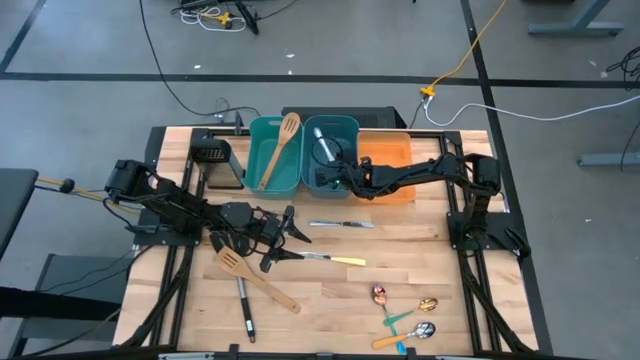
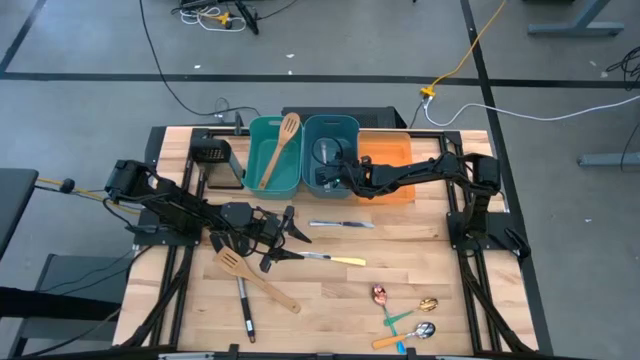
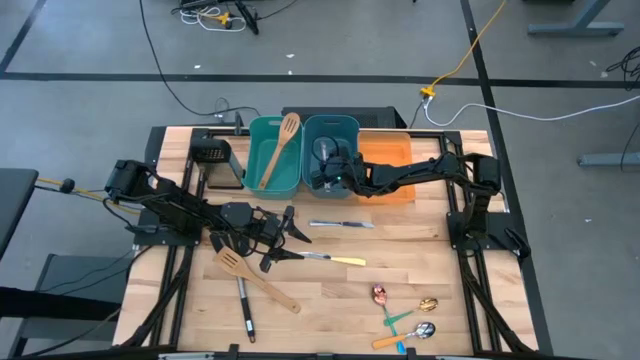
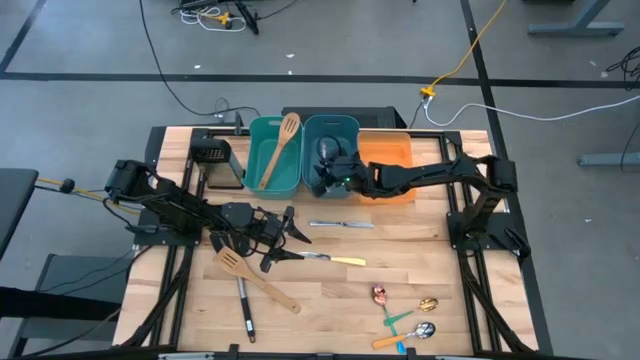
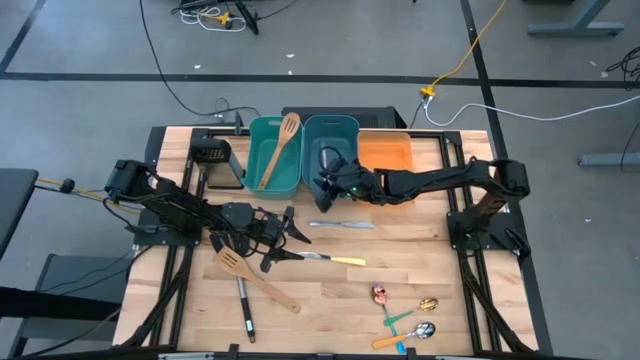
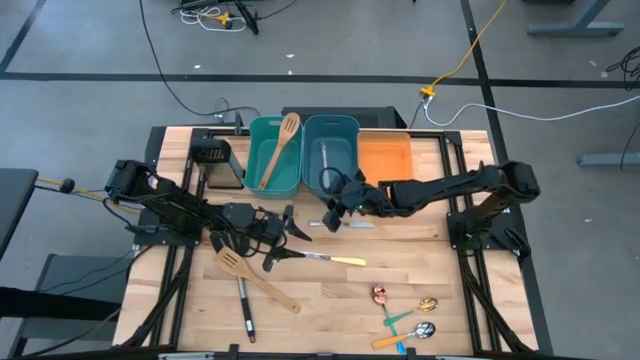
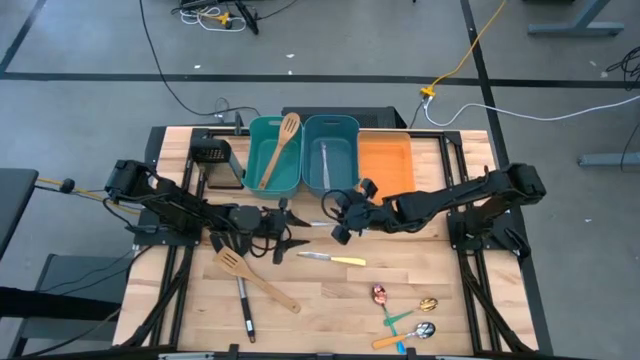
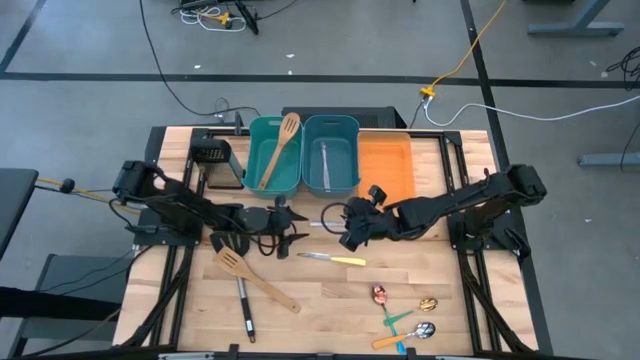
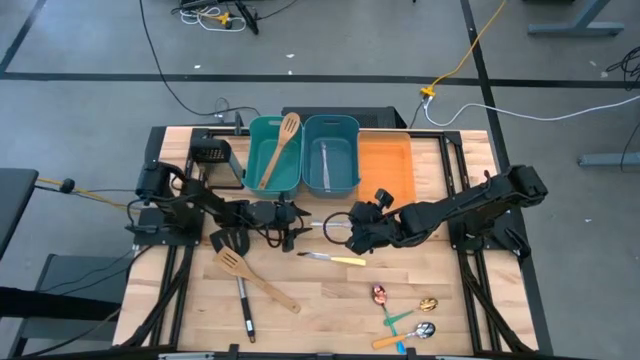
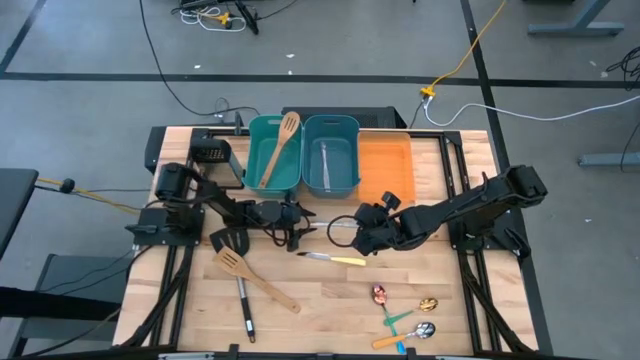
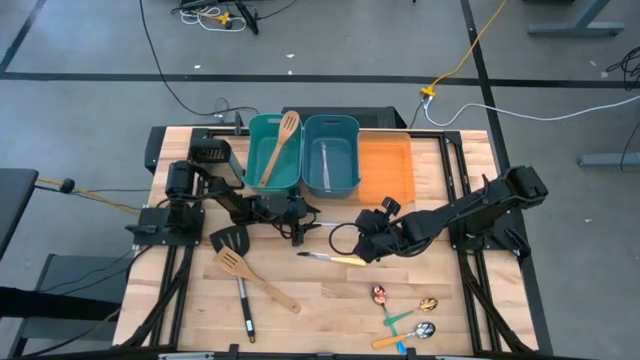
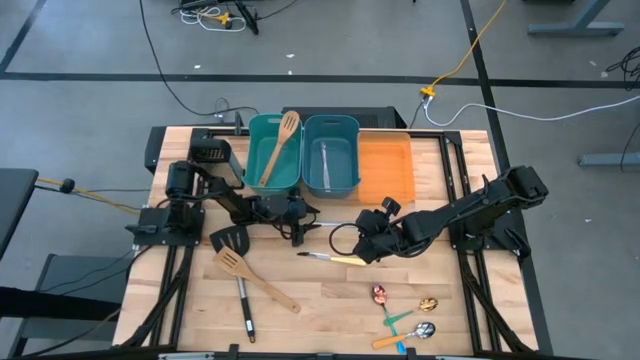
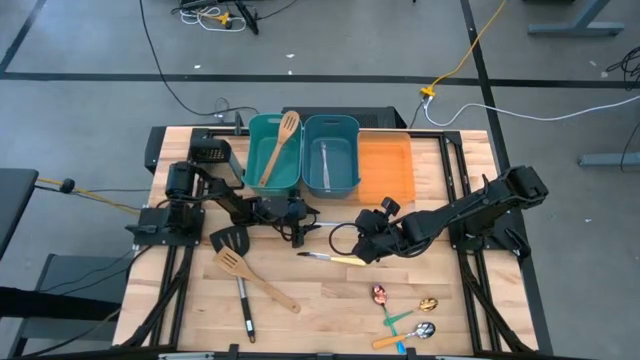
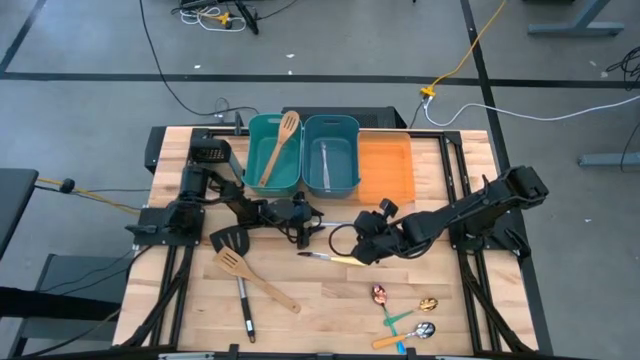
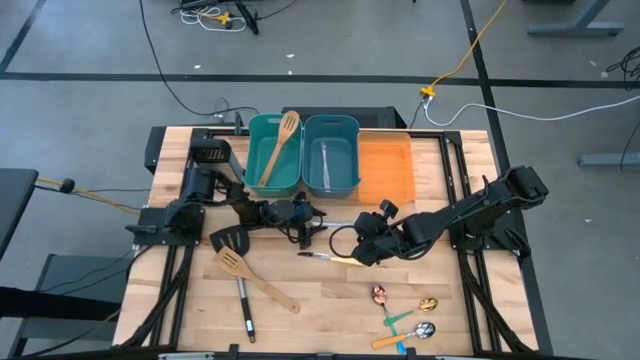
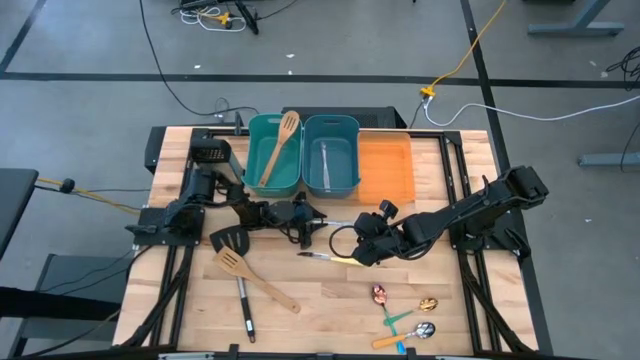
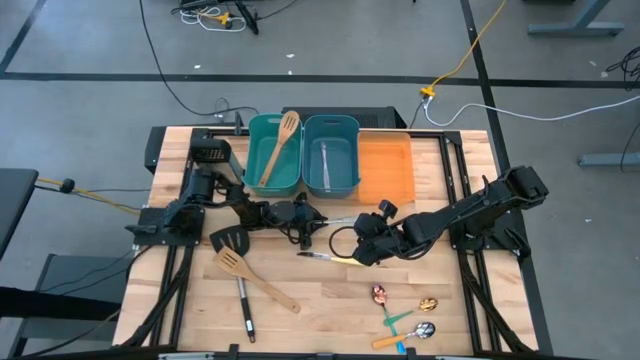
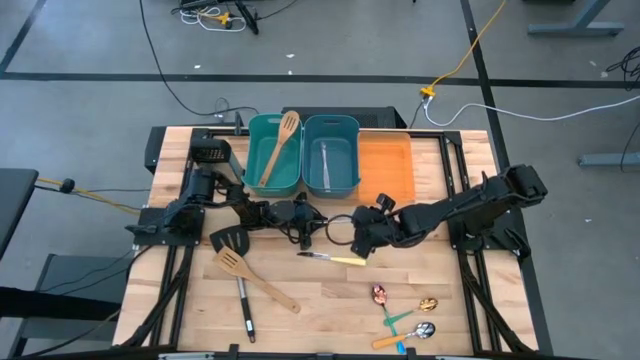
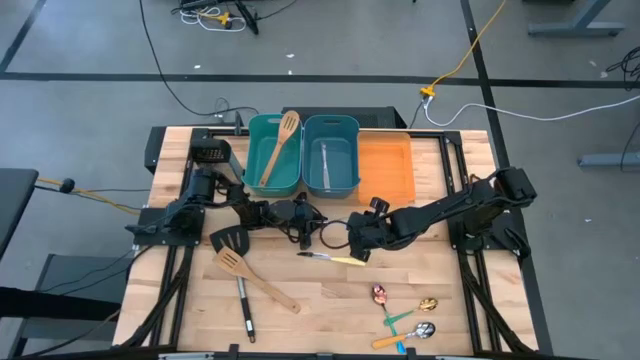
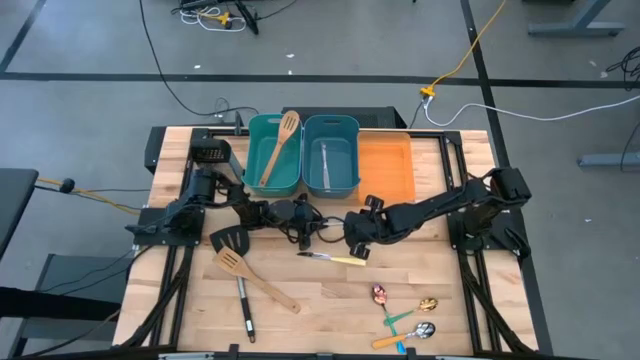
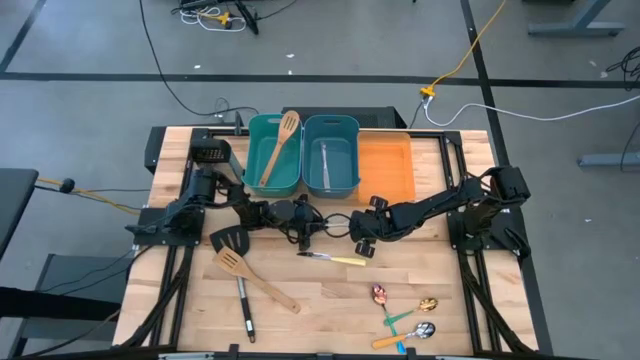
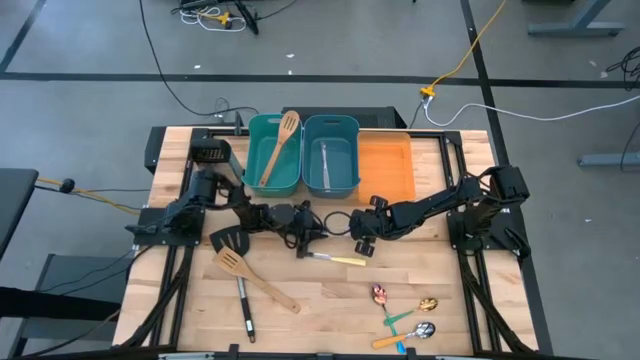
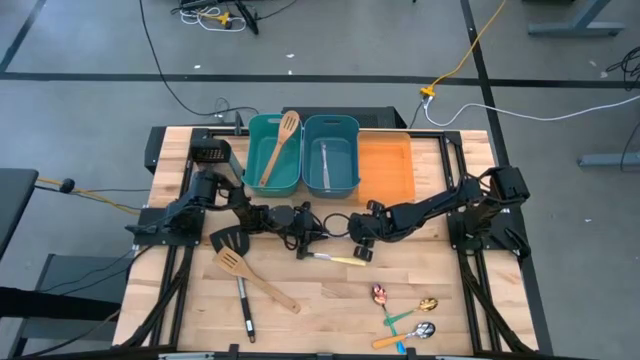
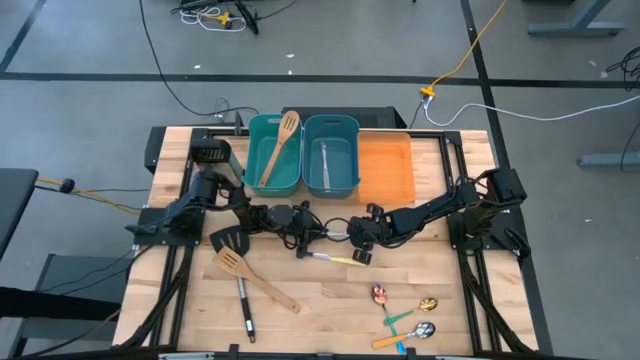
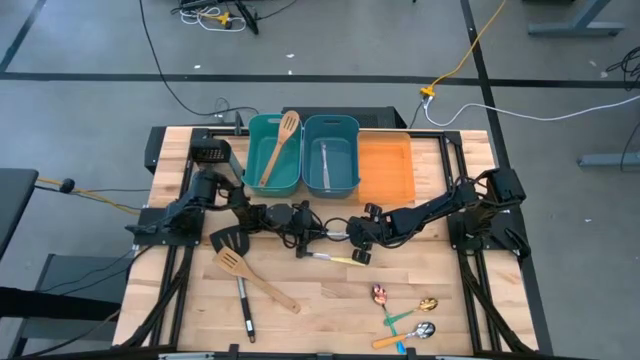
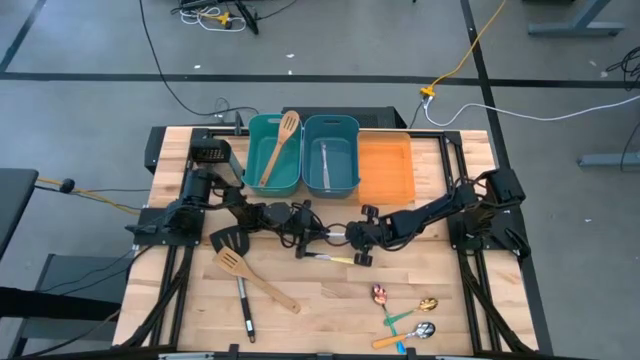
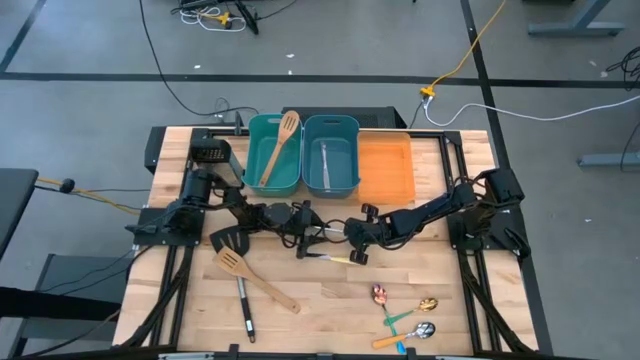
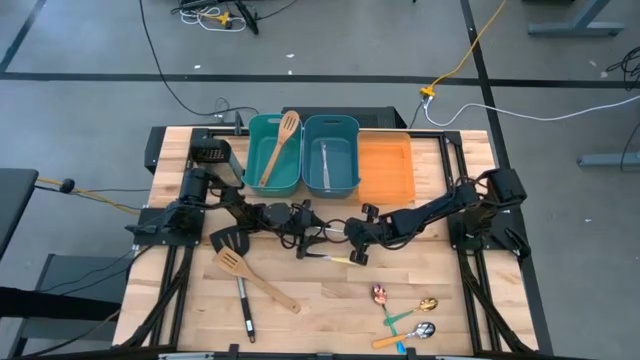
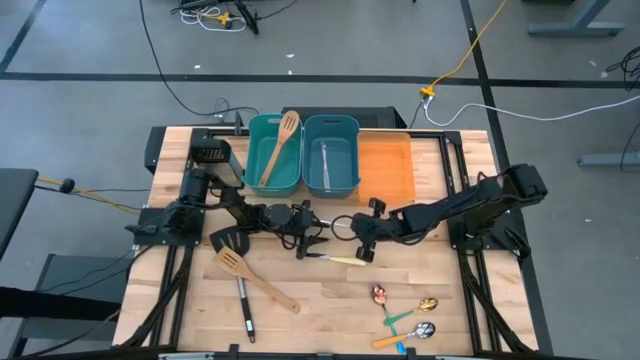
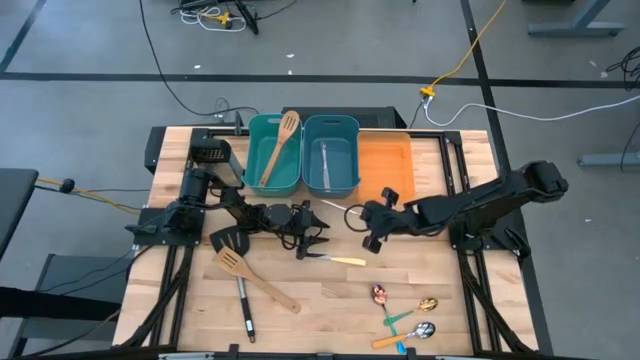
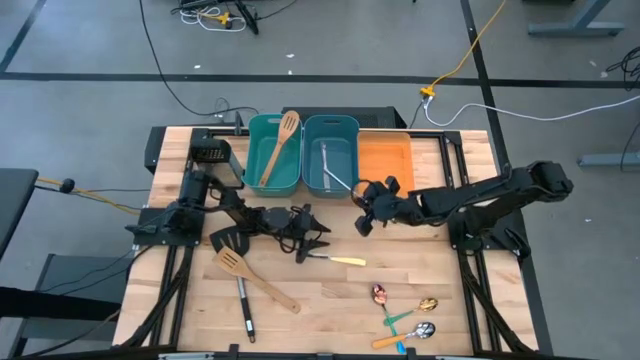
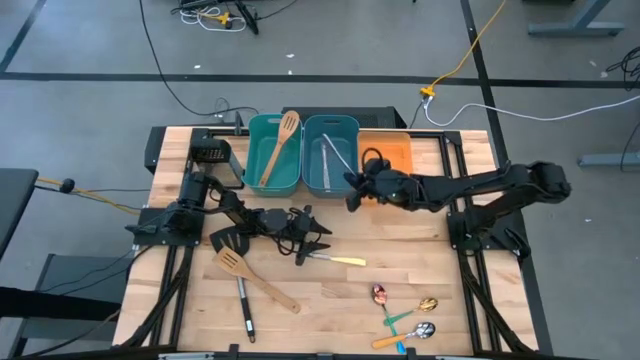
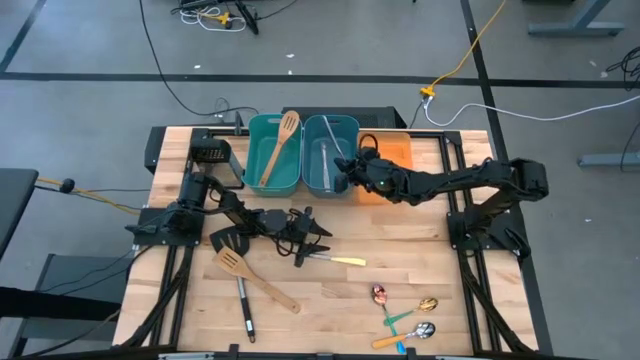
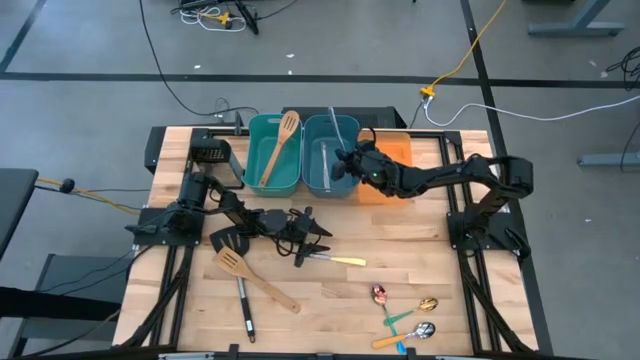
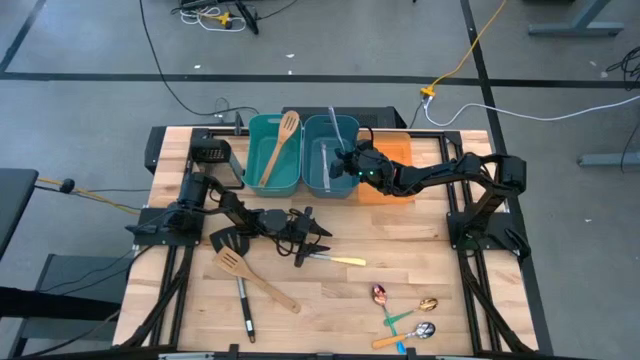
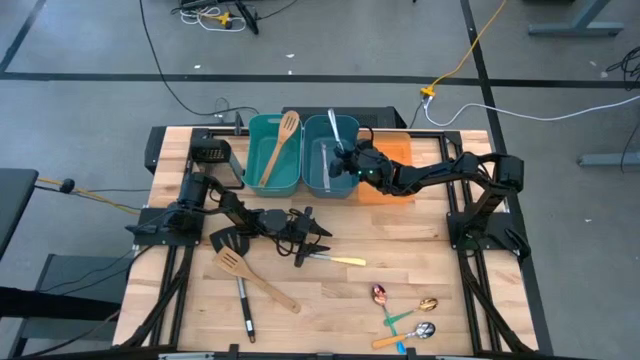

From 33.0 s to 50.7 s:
Task: Pick & Place Kitchen Items
Put the silver knife into the blue bin

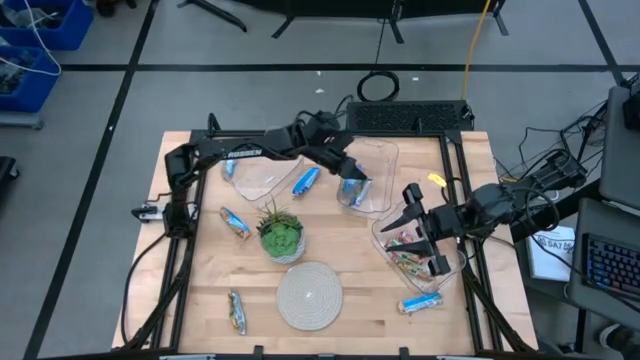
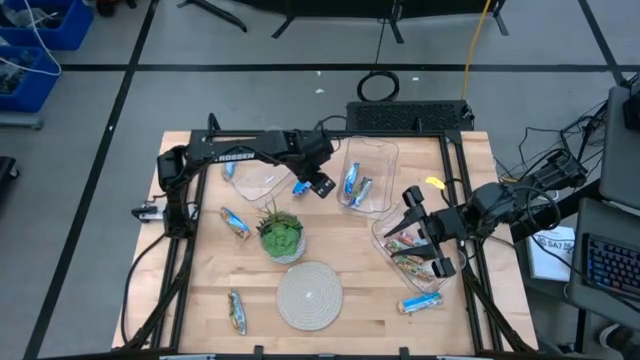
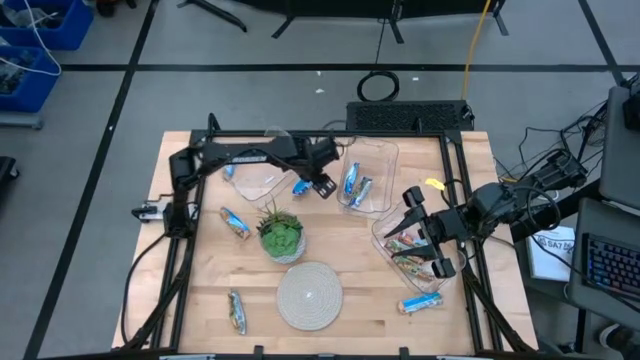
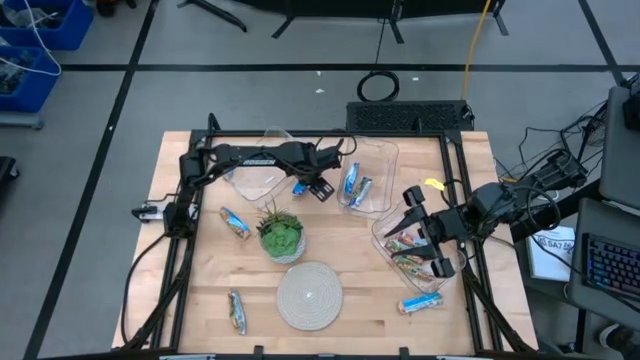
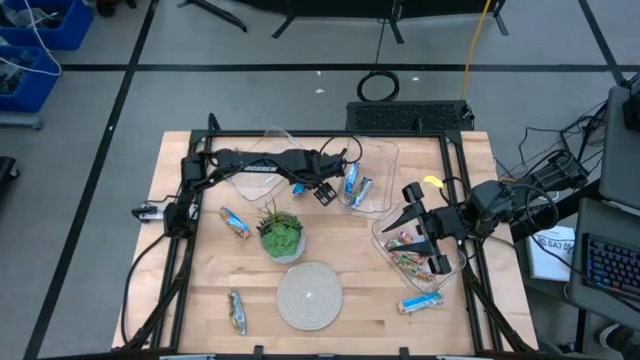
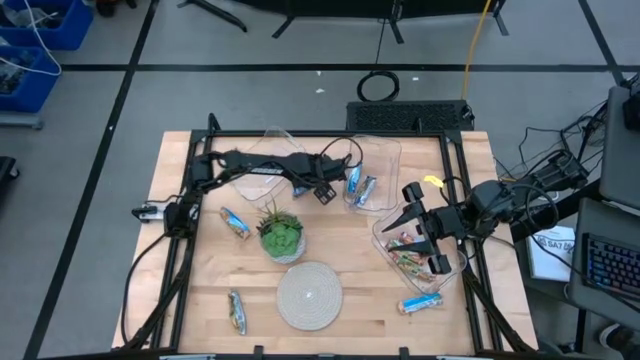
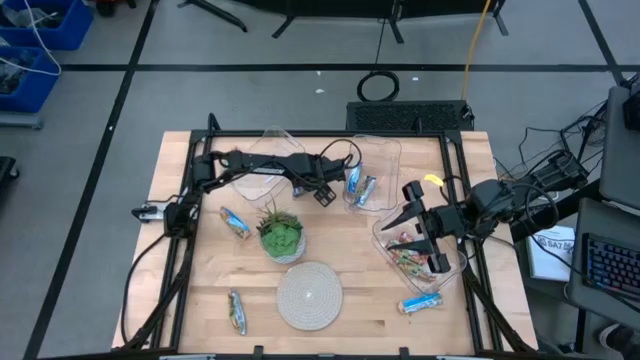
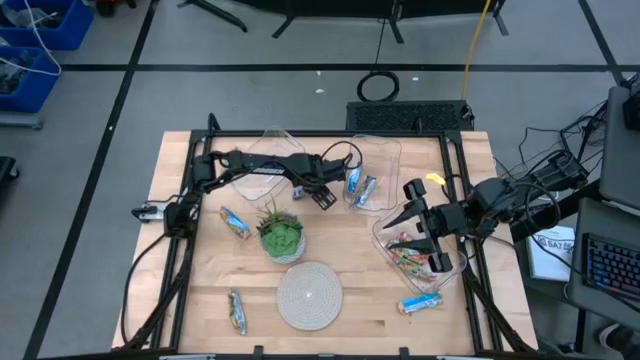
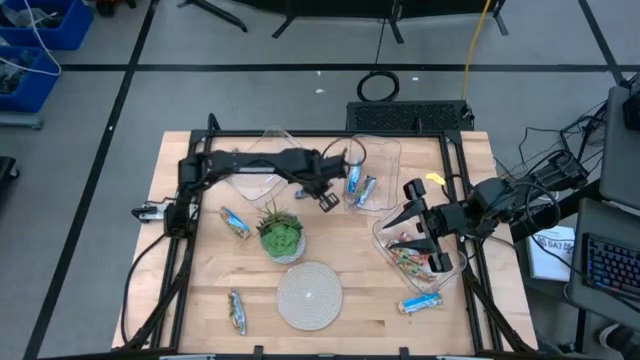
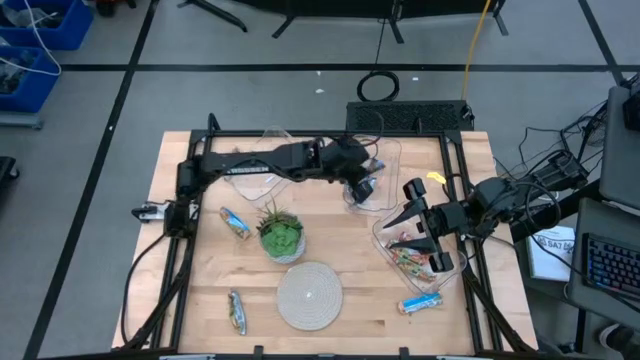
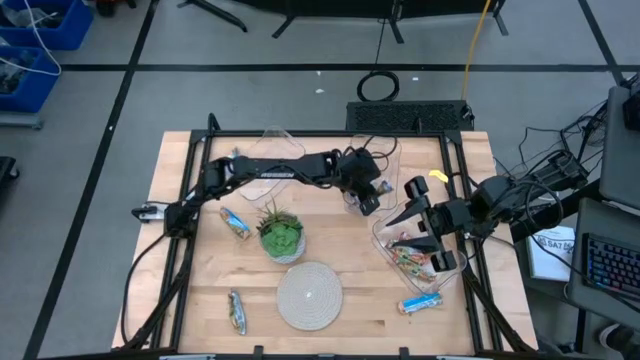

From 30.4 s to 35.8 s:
Task: Pick and place Granola Bars by type
Put the blue granola bar into the top right transparent bin
